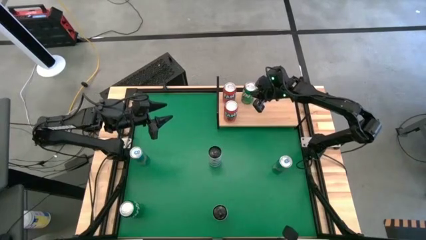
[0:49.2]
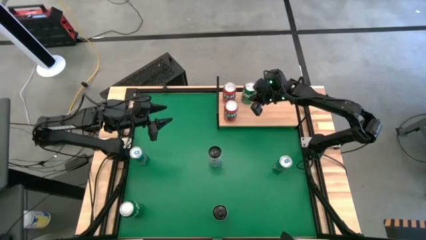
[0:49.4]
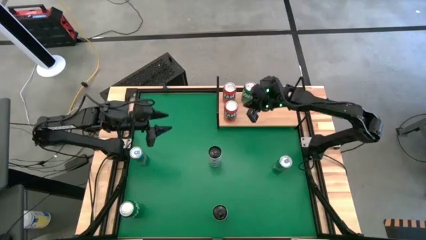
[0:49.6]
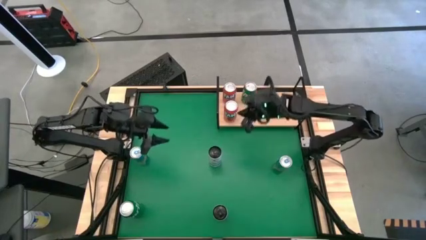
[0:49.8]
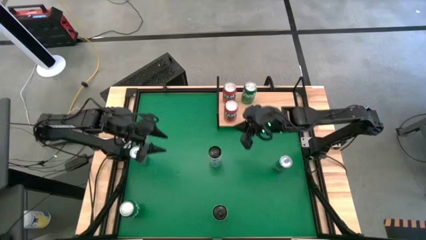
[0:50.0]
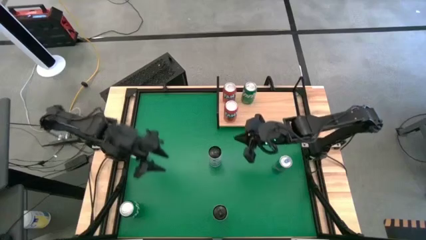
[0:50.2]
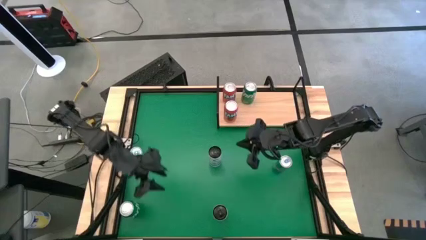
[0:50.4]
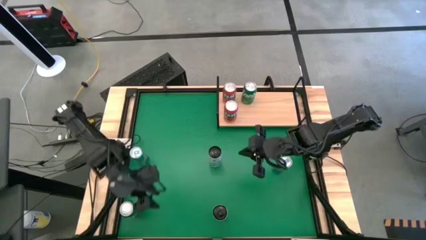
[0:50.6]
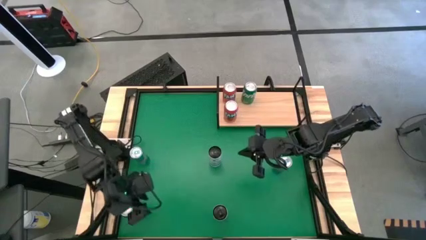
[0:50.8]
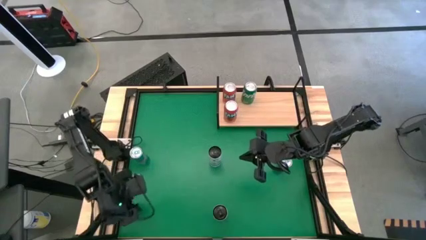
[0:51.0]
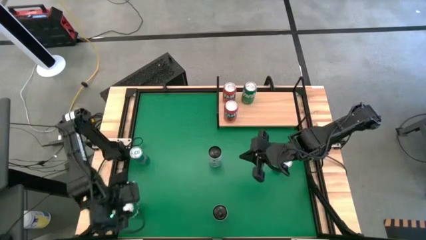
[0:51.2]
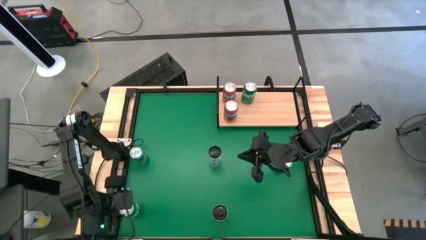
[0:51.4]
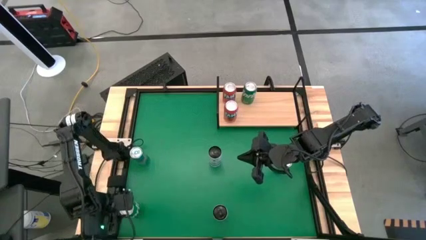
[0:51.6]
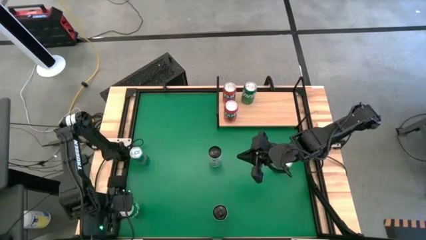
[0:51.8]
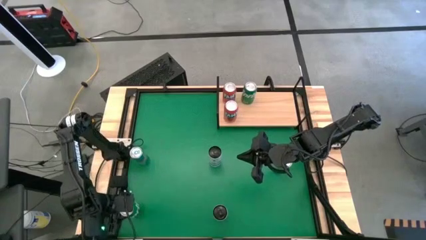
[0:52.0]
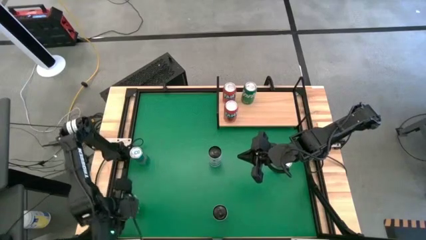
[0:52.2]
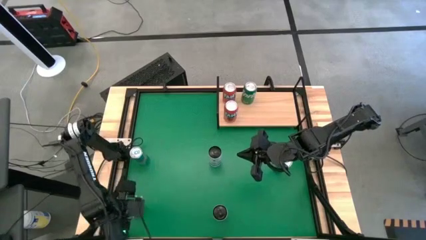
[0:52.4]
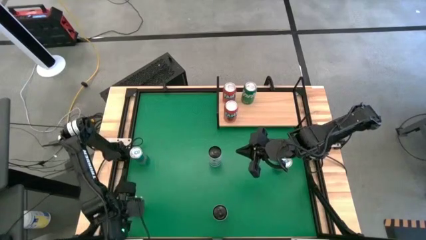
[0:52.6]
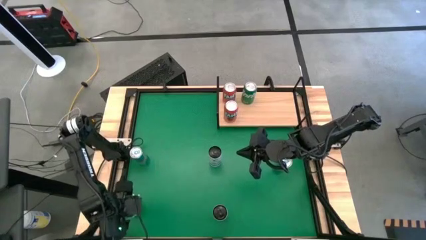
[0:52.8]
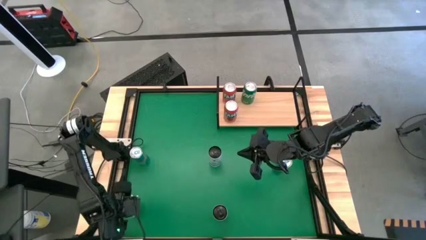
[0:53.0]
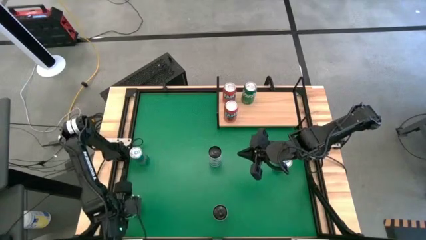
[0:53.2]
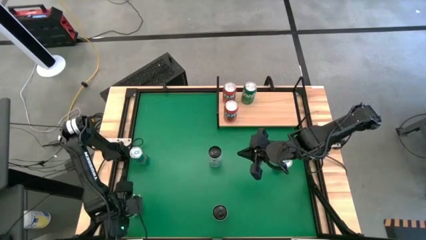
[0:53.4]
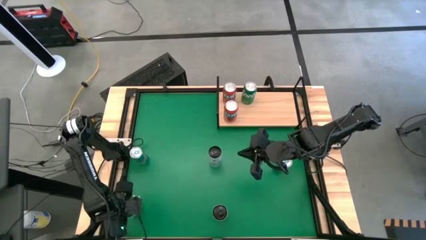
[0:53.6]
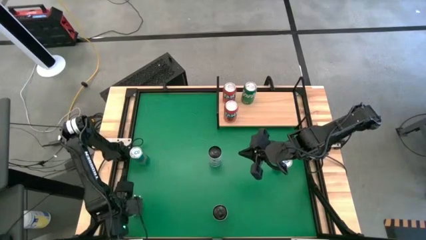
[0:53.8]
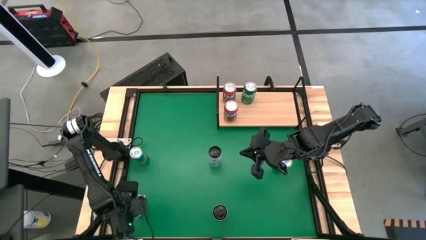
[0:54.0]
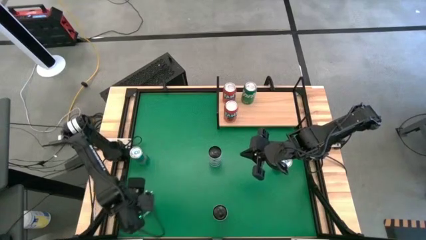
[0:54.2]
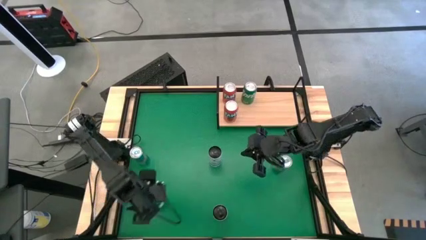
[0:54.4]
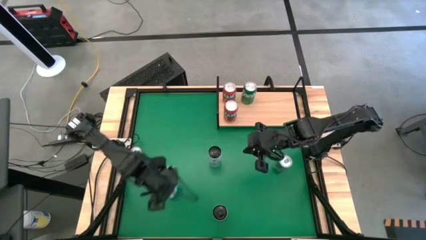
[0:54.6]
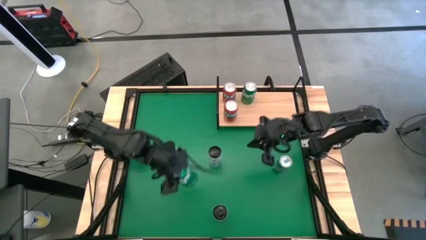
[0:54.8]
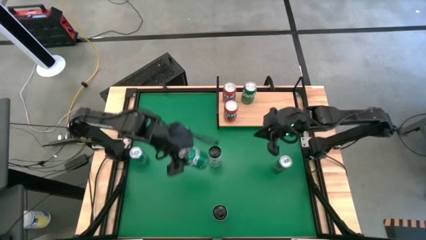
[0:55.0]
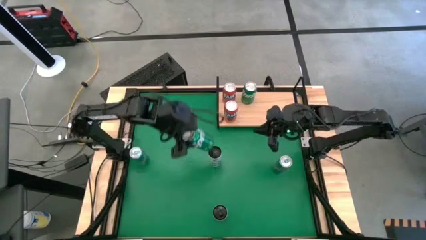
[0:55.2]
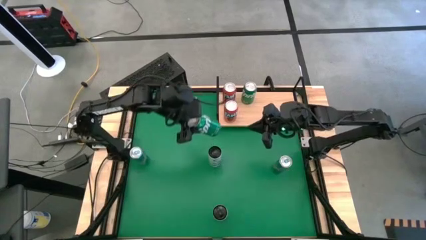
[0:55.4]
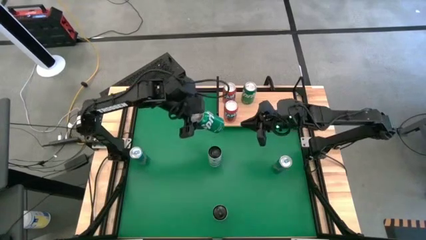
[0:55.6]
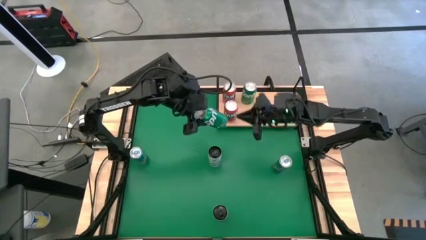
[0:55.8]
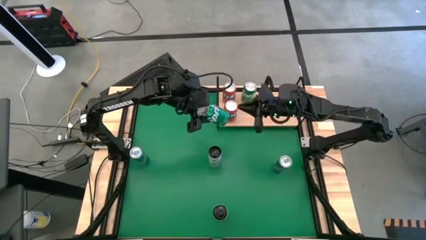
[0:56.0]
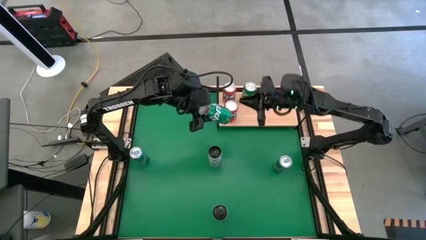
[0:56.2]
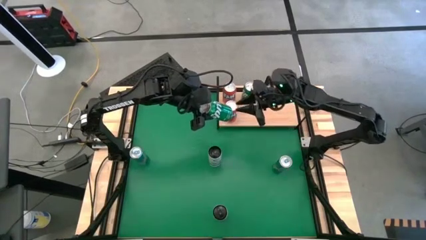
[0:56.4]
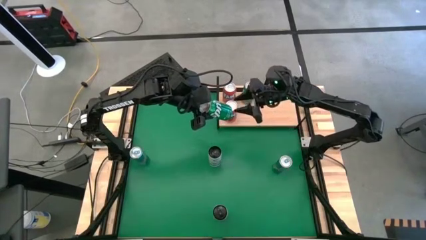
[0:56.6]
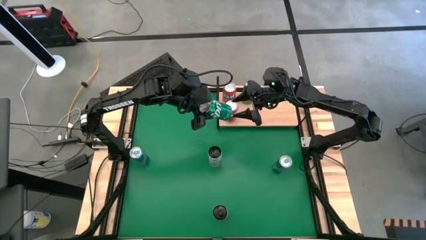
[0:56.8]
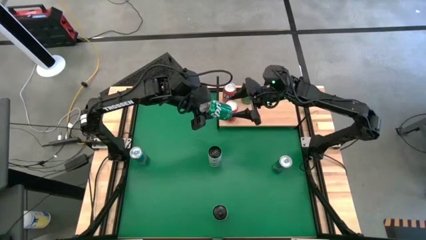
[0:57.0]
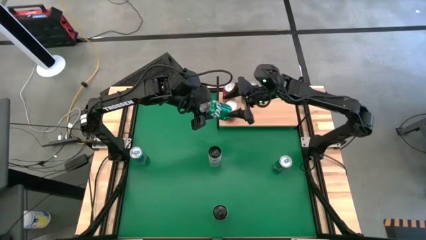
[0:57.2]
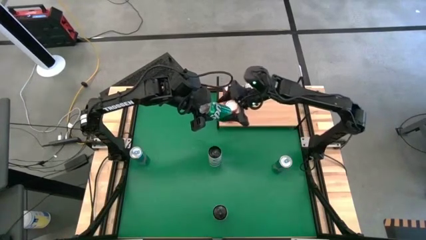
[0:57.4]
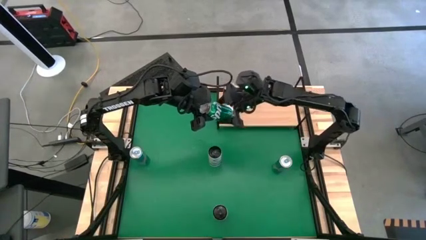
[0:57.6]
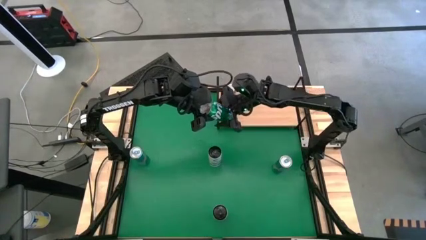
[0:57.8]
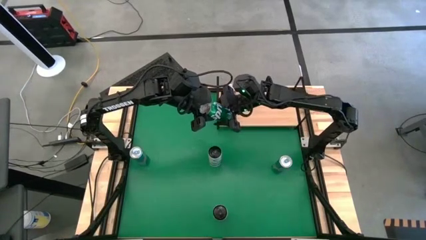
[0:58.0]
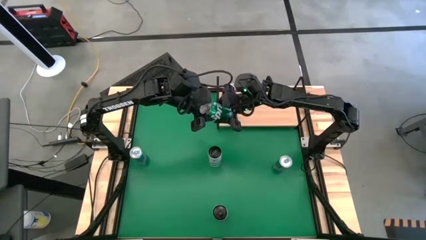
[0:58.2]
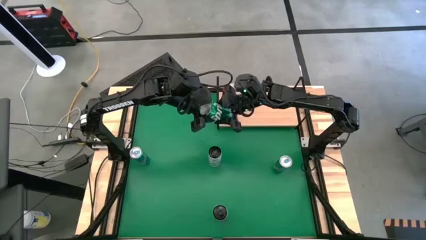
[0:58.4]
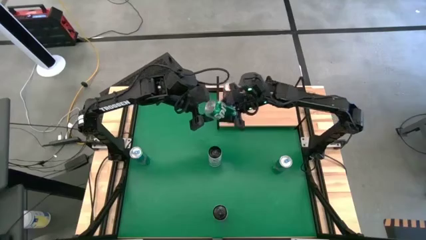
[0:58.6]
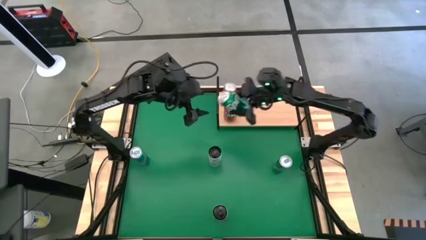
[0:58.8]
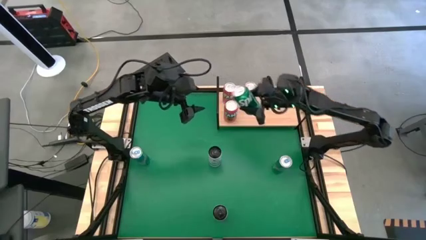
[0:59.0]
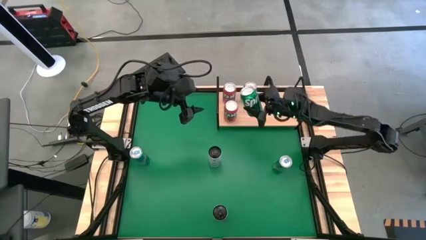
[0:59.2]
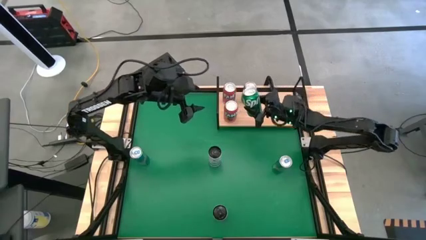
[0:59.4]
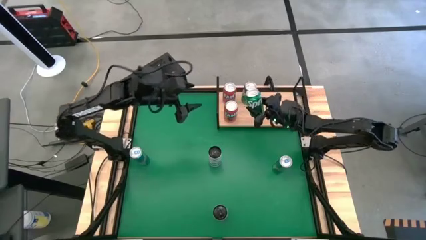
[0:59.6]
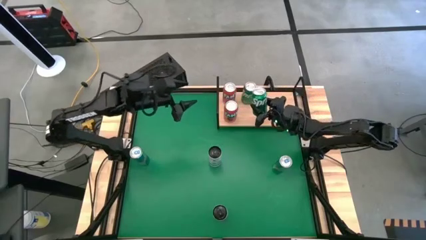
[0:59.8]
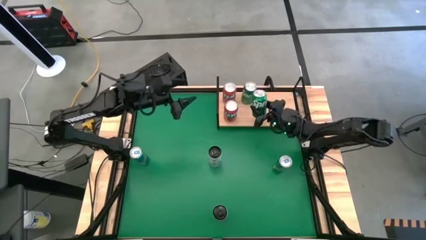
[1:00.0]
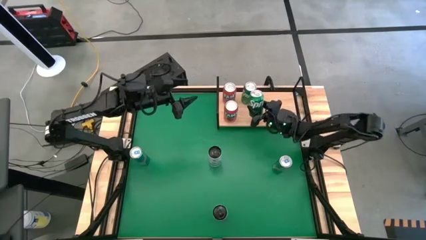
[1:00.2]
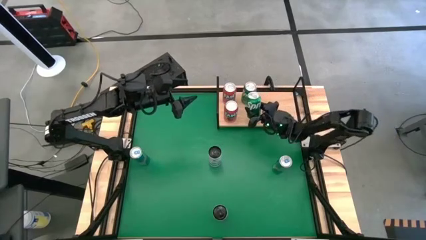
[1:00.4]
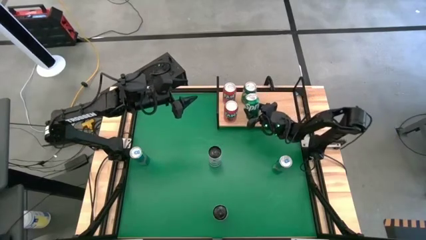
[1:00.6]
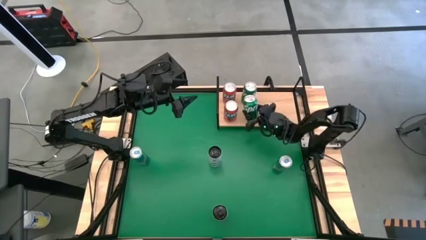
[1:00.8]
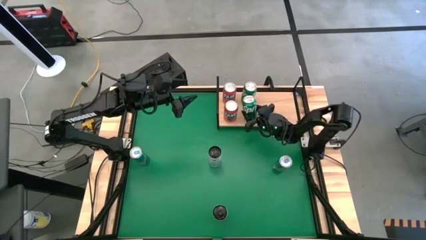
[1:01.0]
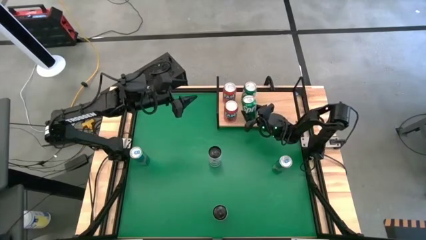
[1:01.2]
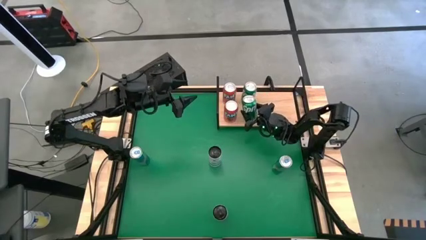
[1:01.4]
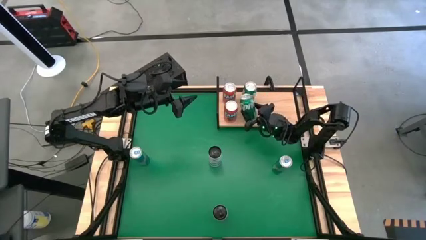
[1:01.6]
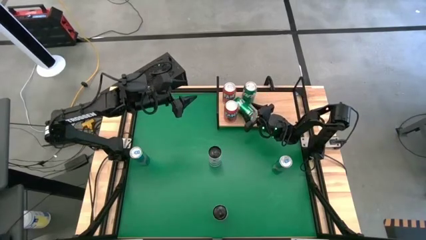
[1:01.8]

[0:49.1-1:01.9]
Task: Place canned beverage on shelf
Put the green soda can on the shelf aligned with the other green soda can

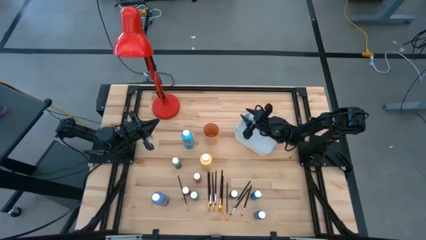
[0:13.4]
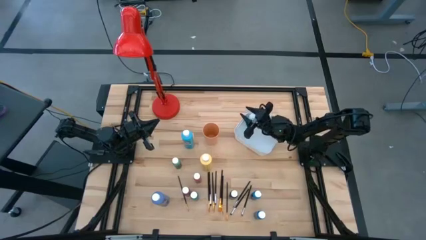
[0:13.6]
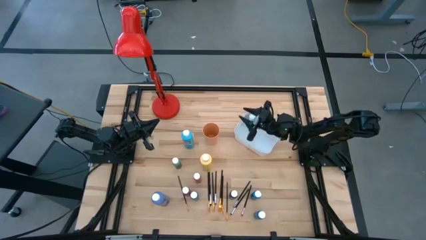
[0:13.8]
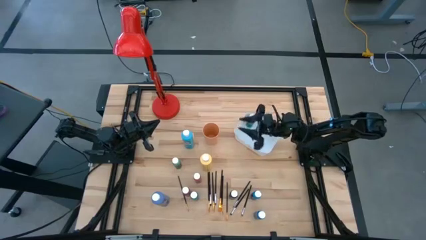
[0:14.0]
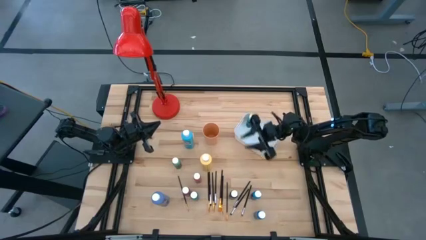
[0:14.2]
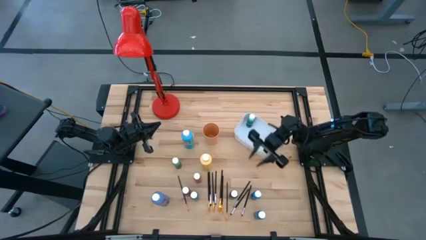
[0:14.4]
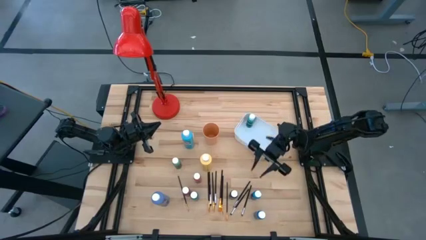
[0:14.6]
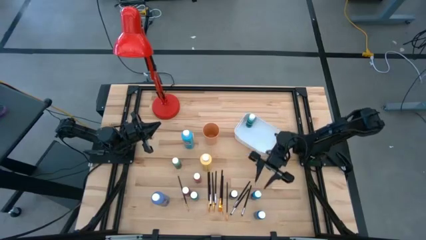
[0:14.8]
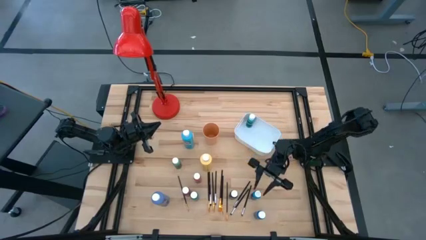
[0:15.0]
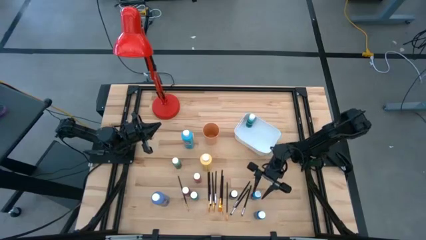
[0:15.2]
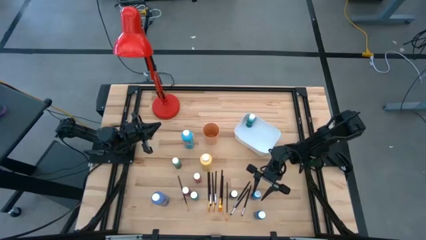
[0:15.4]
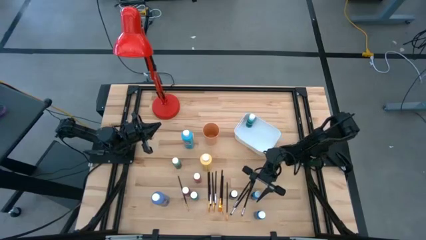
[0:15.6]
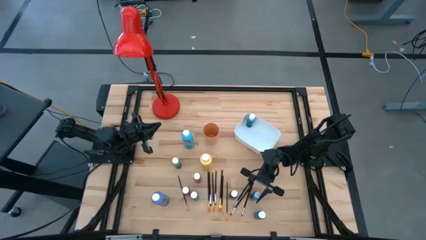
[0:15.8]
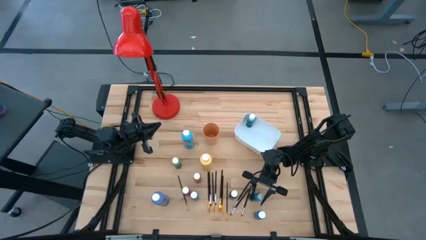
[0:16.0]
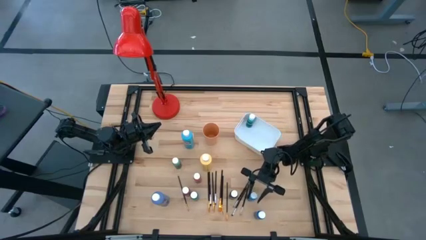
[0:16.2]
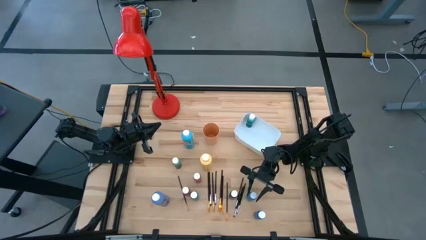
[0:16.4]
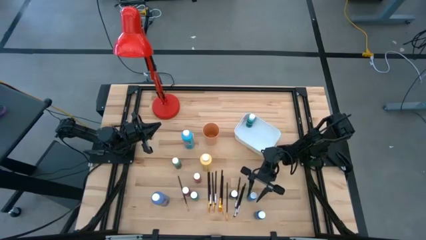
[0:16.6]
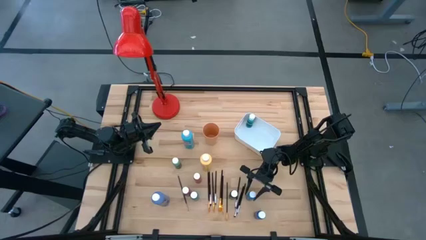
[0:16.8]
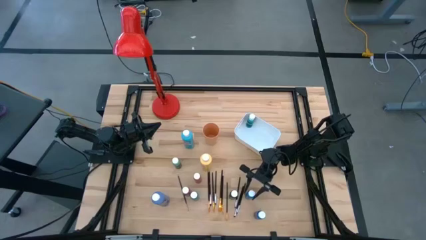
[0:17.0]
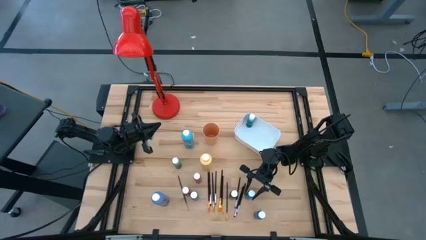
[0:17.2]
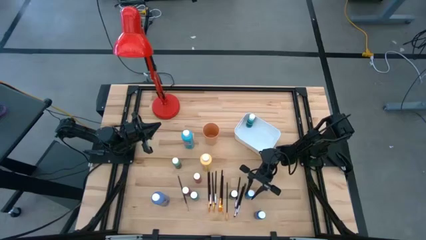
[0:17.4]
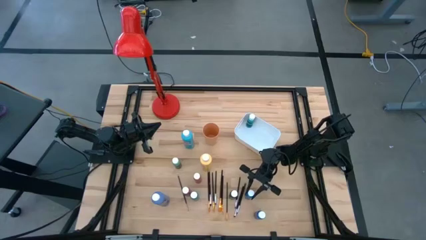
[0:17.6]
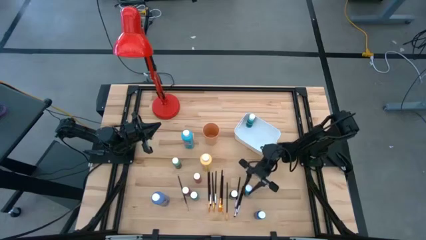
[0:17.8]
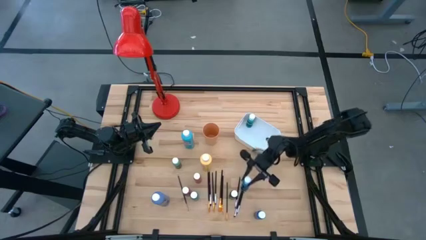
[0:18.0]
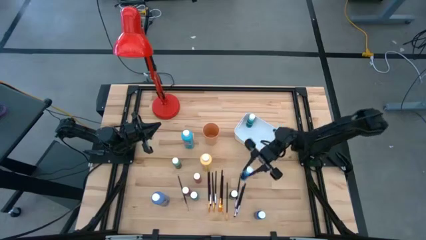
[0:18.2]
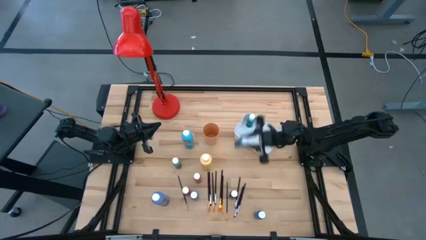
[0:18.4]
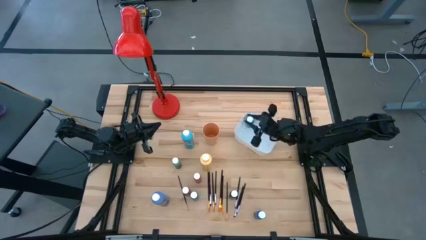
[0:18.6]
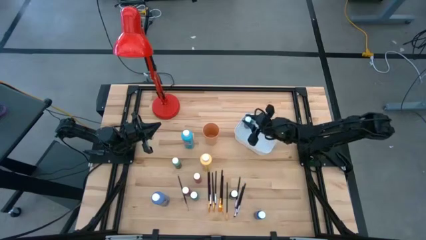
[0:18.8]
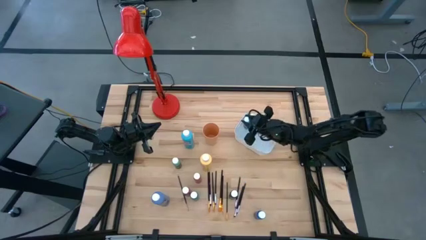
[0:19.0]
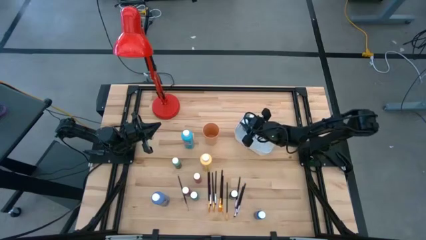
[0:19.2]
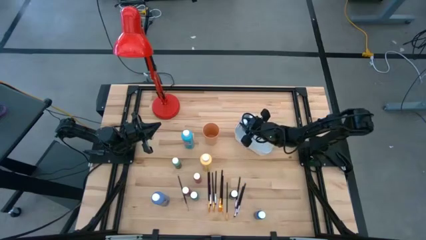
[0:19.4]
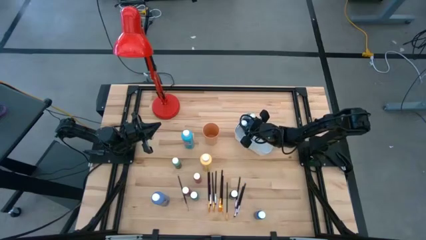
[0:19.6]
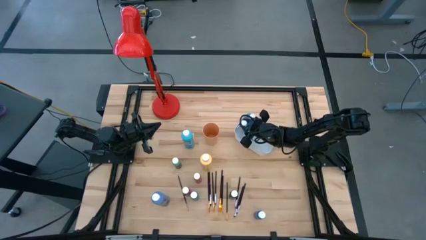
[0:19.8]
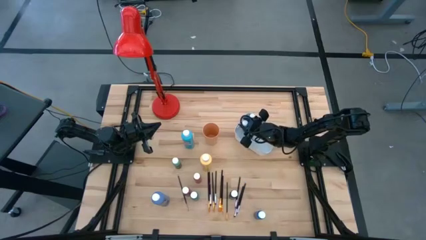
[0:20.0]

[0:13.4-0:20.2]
Task: Pick & Place Paint Supplies
Put the light blue paint bottle into the white bin
